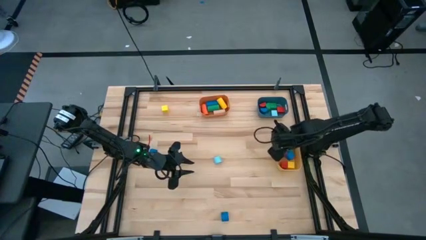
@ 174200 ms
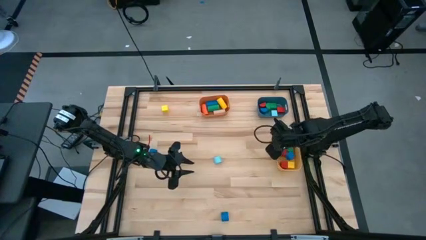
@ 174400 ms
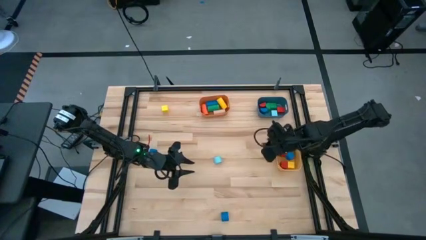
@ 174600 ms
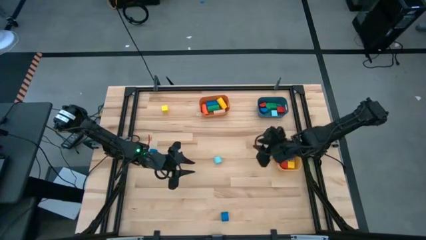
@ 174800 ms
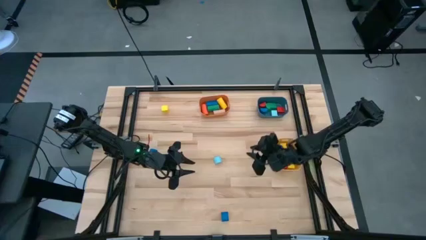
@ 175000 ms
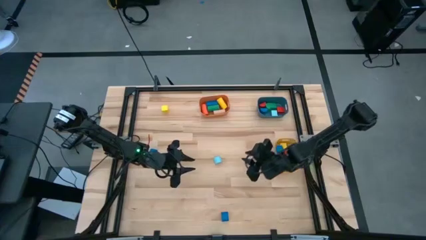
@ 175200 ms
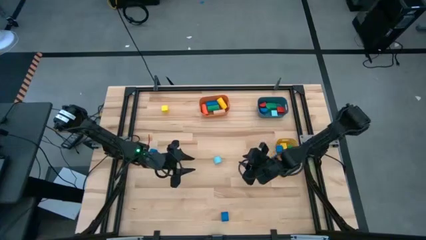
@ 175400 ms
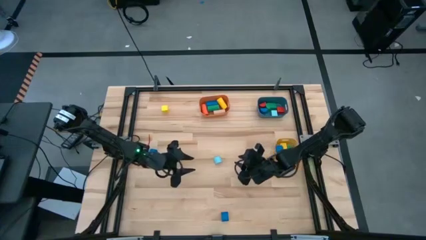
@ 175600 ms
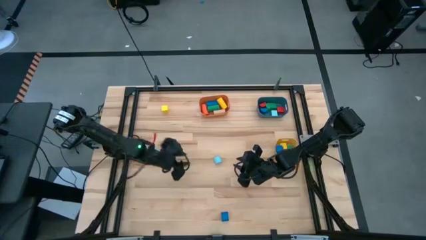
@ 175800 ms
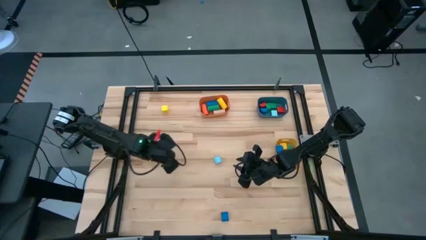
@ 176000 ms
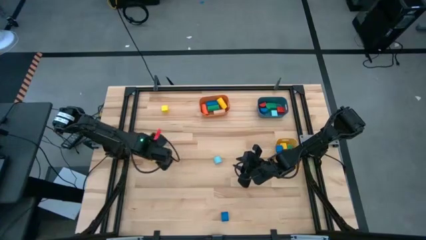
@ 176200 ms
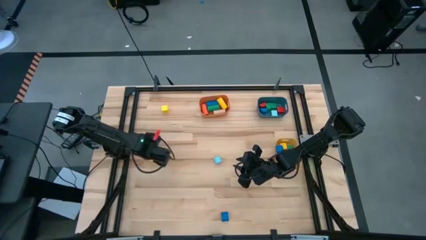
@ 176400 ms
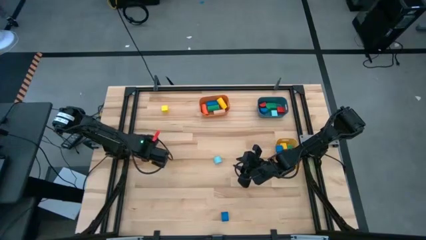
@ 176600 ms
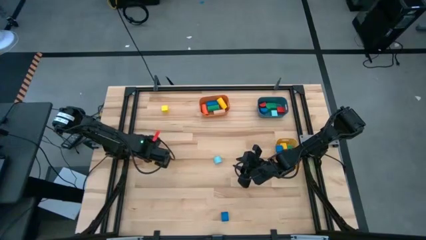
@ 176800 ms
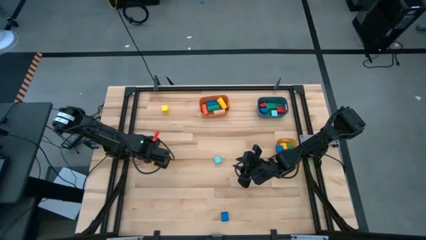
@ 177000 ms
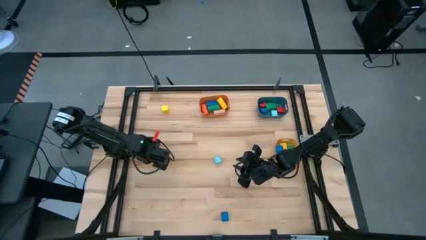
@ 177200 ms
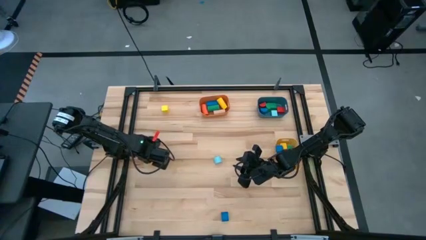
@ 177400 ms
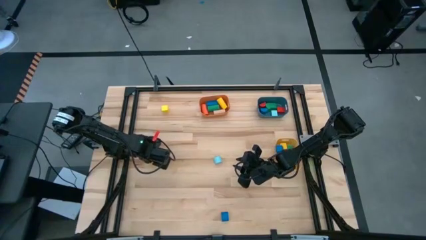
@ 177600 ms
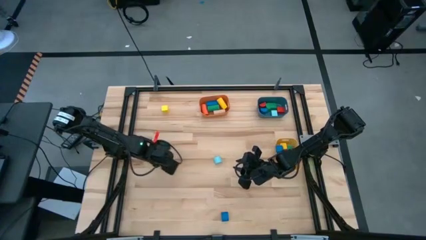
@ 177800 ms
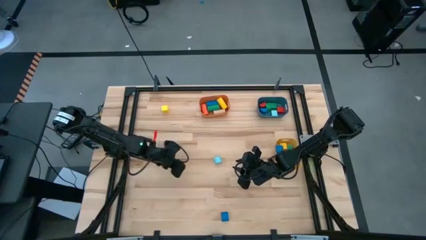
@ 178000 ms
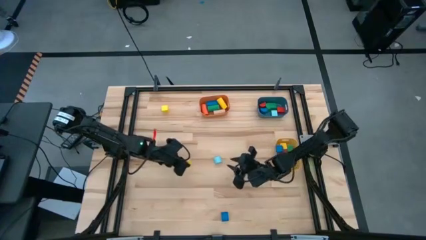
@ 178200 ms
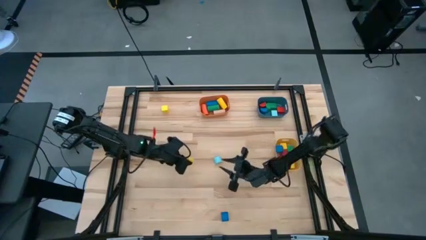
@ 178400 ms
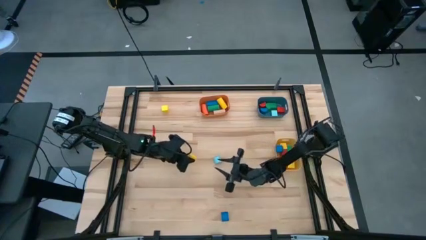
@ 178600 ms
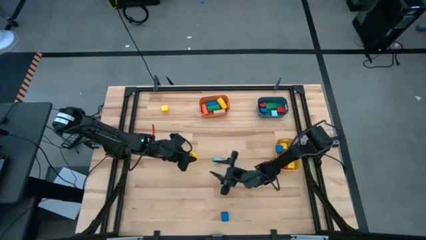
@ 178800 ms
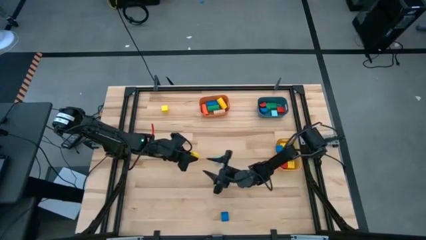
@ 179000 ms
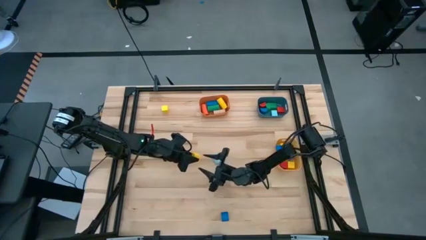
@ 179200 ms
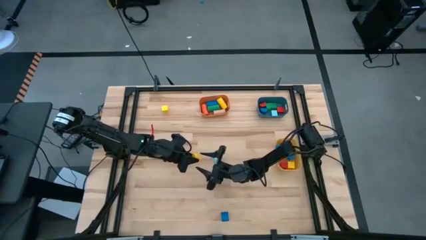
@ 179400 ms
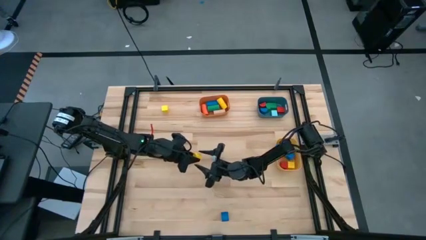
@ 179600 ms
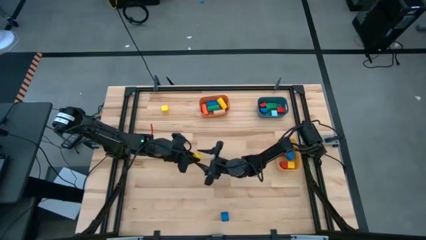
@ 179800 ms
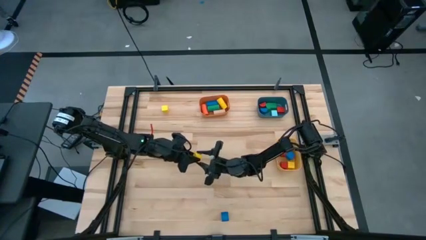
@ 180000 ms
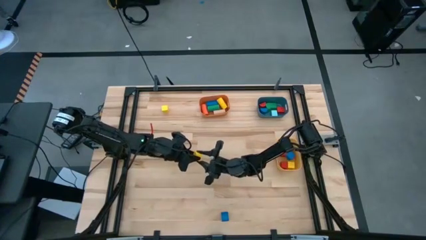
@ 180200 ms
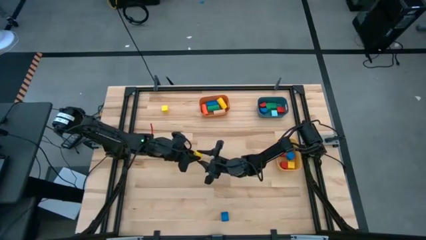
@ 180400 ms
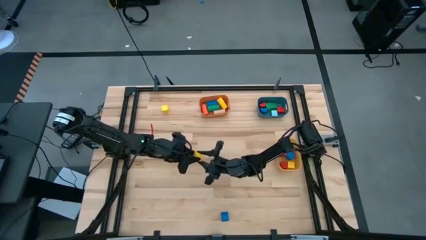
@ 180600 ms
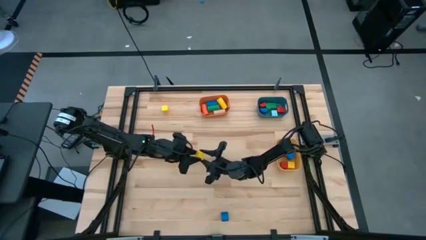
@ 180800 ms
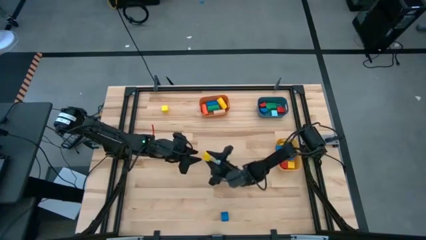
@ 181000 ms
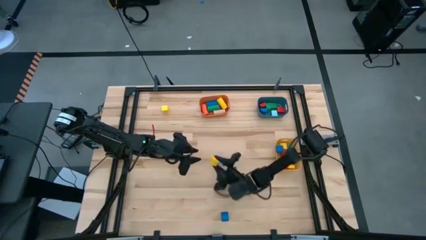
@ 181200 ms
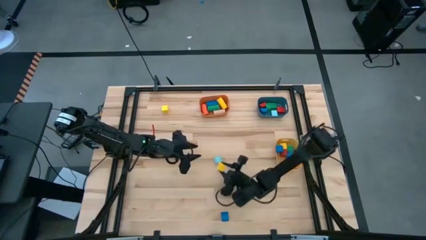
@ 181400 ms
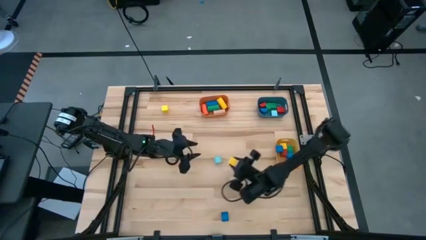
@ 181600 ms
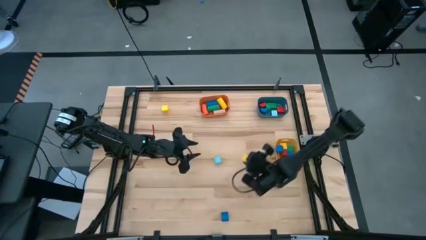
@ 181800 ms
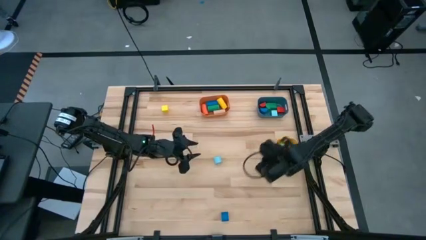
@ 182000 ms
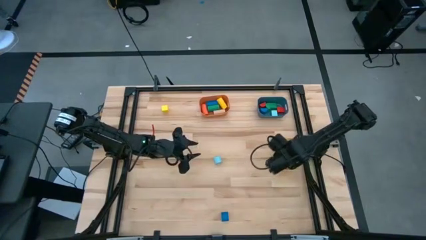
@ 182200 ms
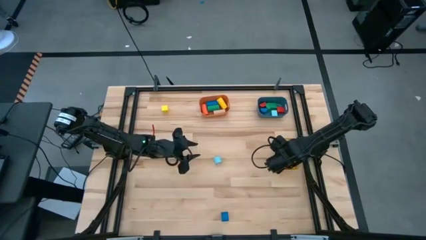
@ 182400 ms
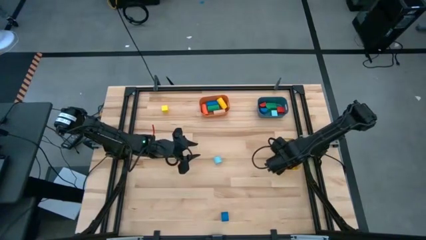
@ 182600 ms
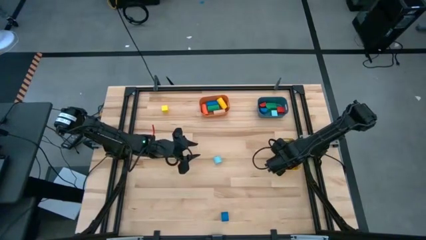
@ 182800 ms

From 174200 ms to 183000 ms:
Task: Sort blocks by size
Put the yellow cube block into the yellow bin

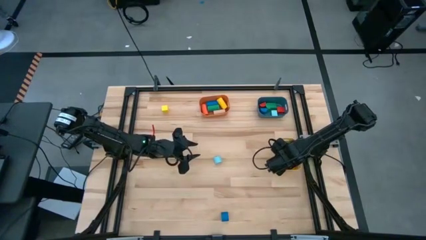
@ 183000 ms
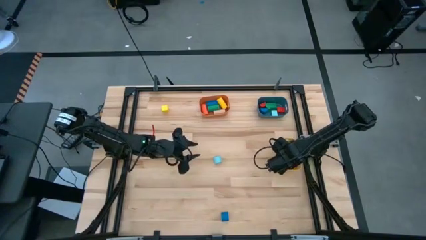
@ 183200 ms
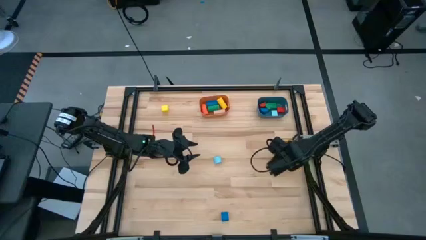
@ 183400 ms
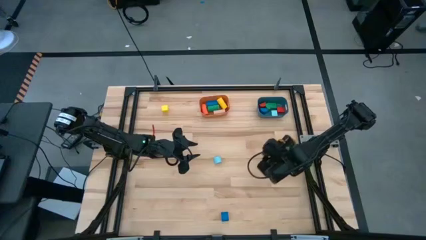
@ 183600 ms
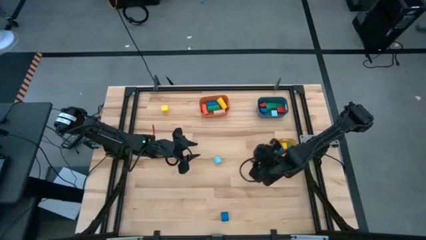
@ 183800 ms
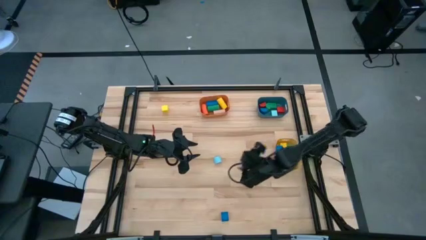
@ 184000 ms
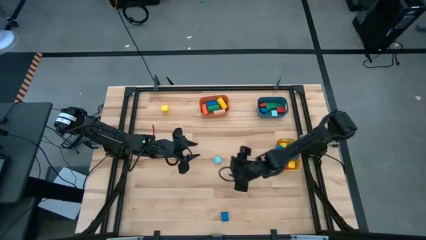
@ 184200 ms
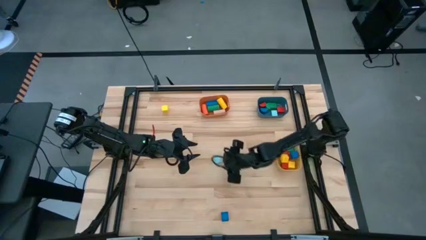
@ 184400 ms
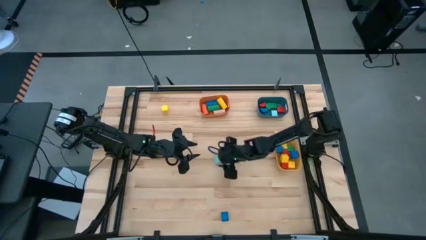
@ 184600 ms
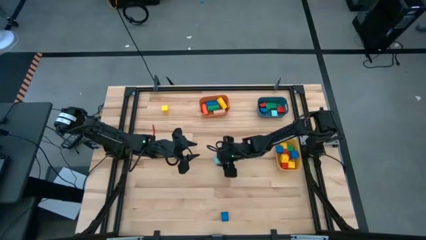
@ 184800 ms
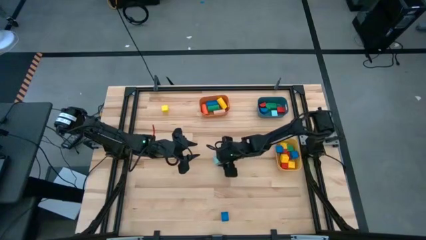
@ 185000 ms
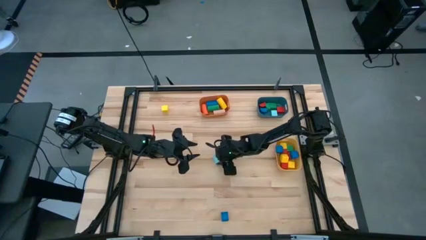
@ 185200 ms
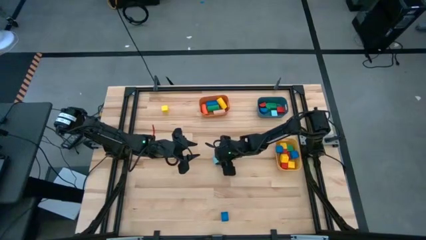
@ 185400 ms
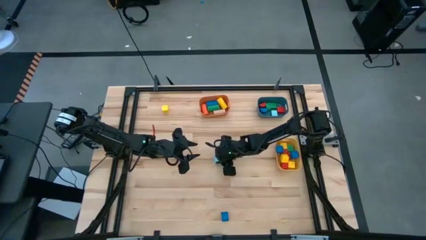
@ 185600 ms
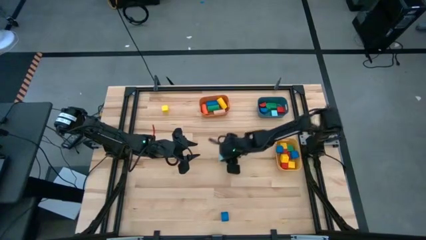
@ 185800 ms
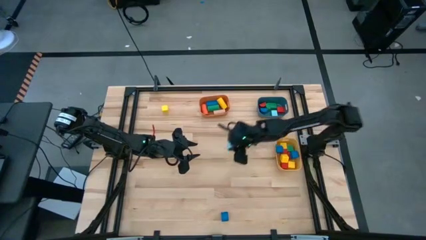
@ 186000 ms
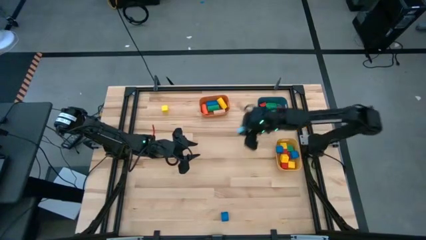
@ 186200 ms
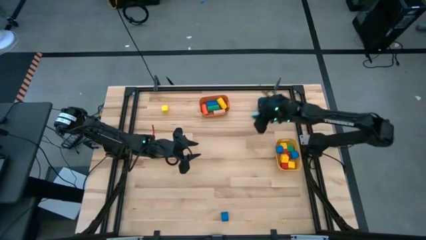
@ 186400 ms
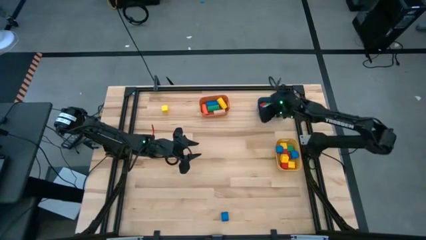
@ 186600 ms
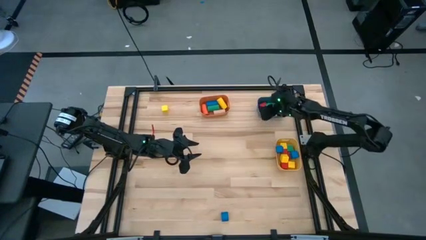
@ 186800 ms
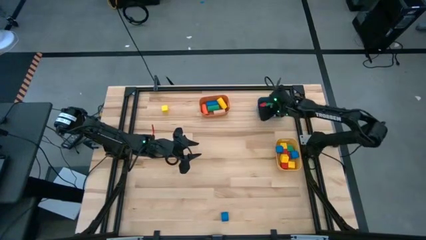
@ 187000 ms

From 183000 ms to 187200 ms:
Put the light blue half circle block into the blue bin
